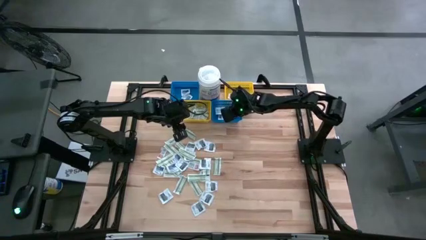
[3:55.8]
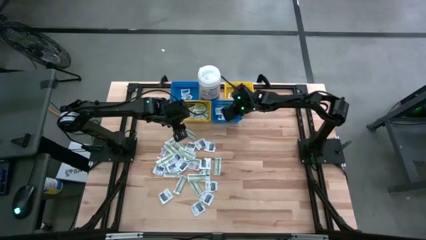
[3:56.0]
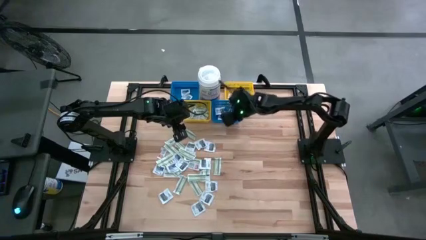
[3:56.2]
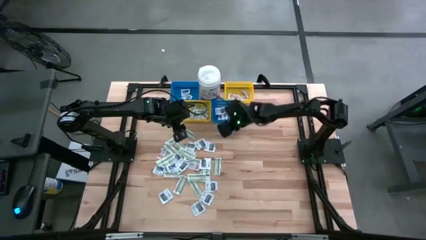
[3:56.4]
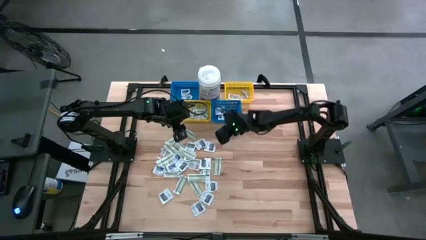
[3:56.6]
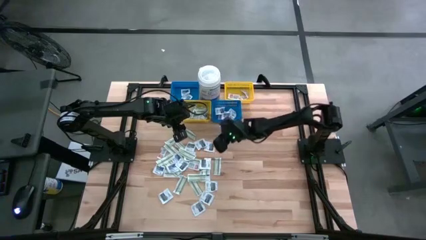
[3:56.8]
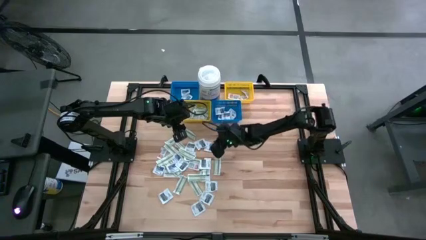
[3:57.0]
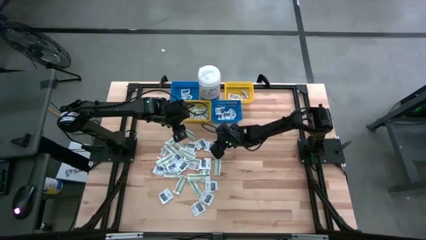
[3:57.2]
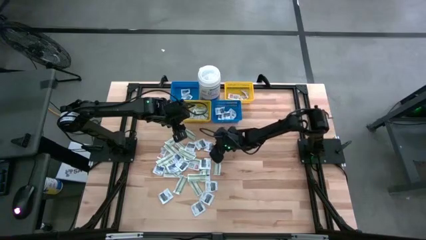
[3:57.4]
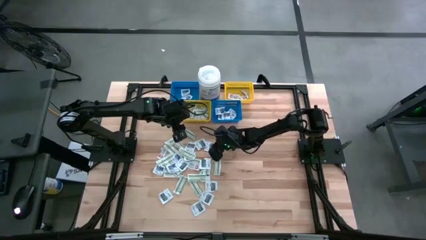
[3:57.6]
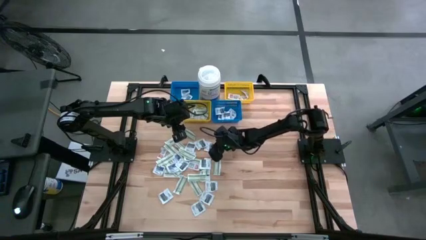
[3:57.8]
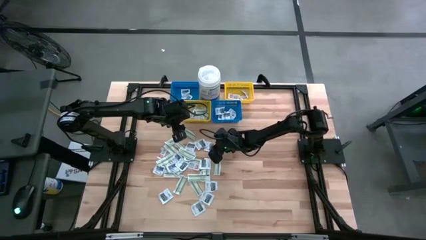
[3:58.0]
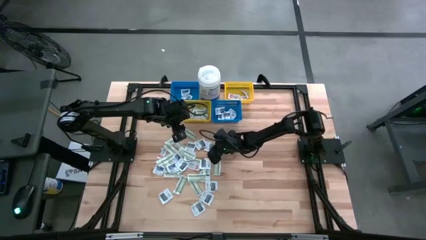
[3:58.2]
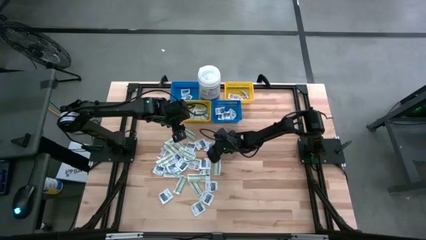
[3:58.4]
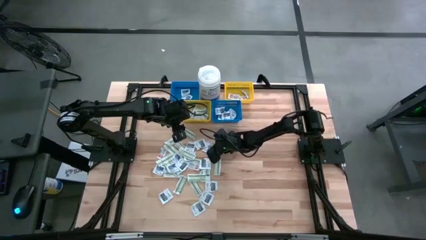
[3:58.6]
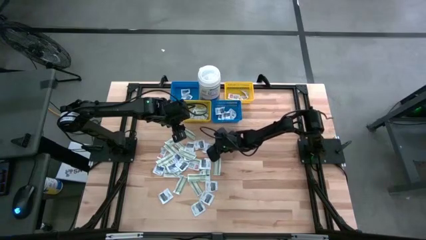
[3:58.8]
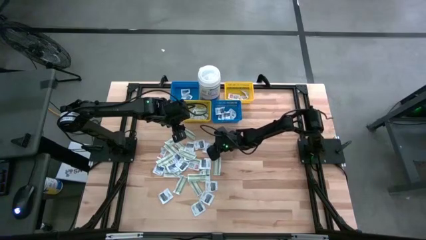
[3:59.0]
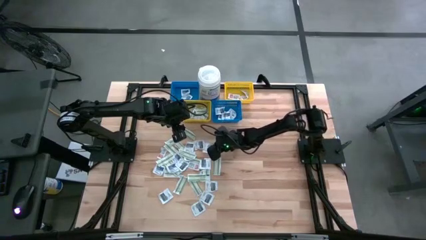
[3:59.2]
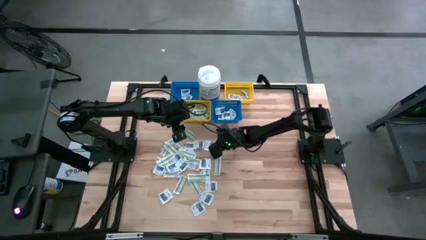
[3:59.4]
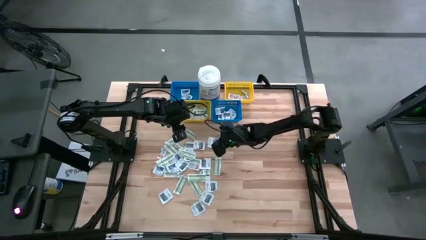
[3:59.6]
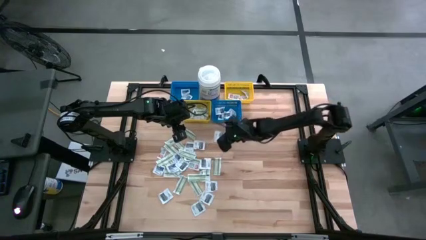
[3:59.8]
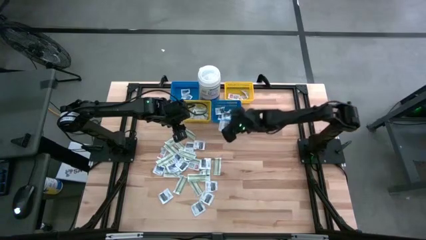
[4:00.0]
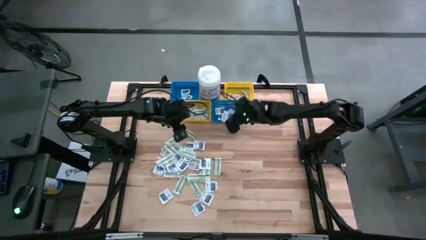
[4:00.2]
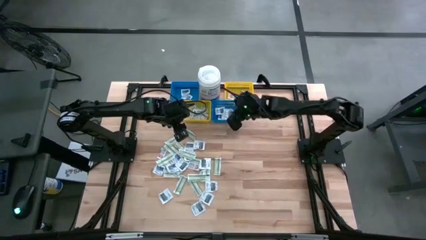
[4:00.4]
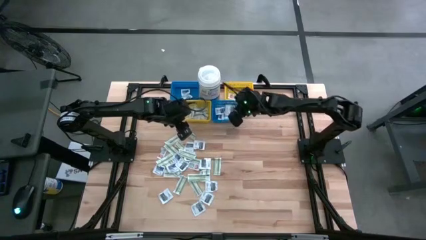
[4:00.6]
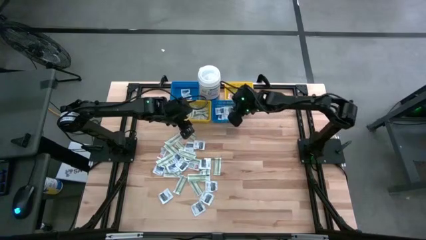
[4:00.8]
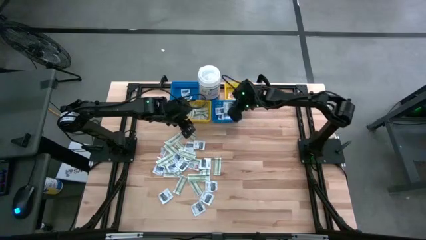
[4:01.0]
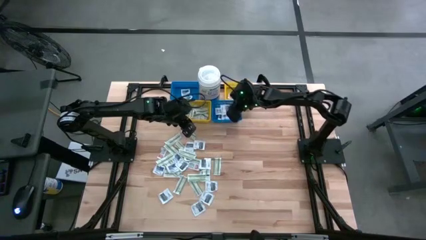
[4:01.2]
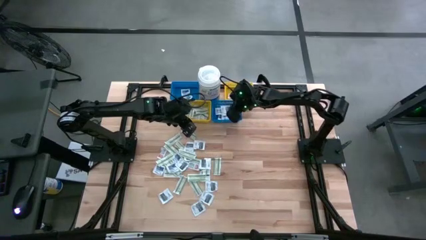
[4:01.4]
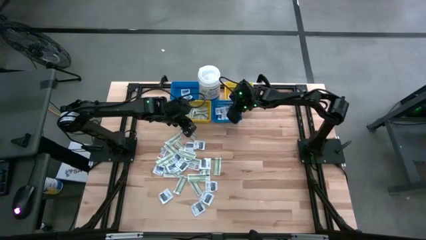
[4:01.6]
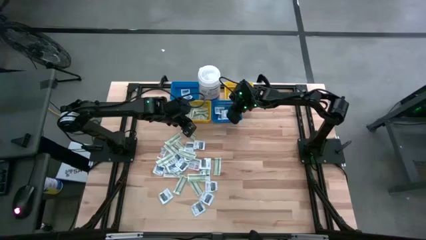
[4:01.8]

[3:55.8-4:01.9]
Task: Pick & Place First Aid Supplies
Put the black towelette pack into the right blue bin

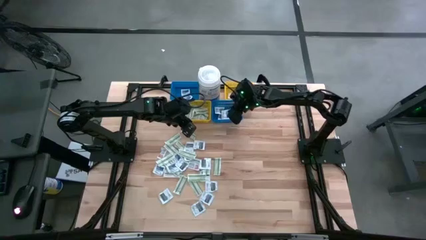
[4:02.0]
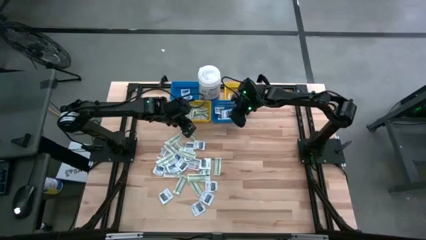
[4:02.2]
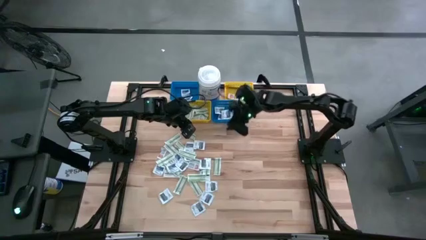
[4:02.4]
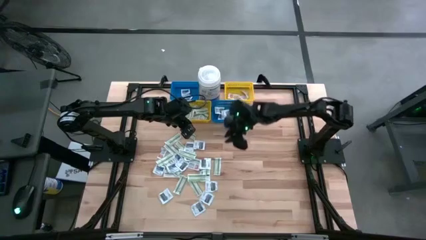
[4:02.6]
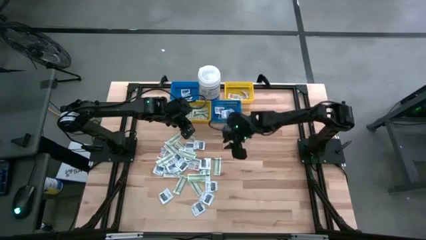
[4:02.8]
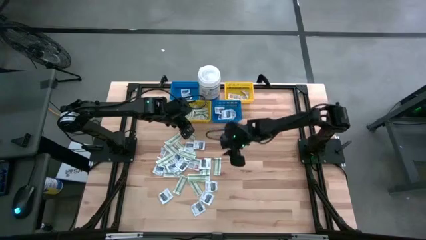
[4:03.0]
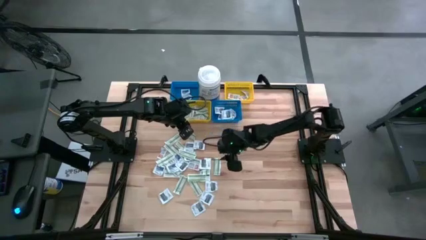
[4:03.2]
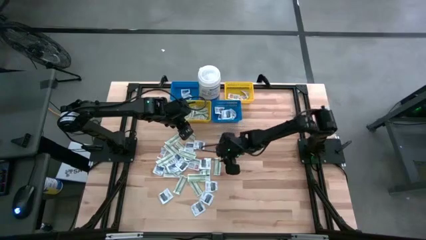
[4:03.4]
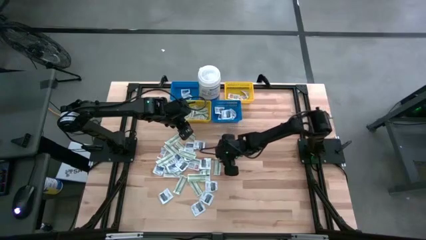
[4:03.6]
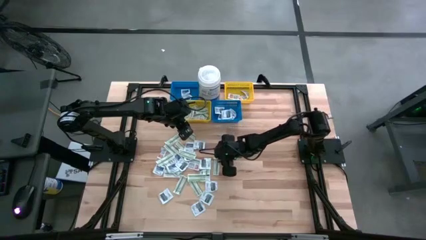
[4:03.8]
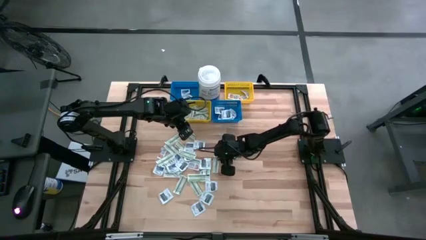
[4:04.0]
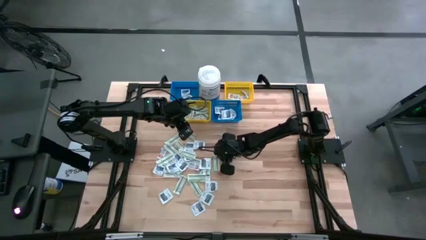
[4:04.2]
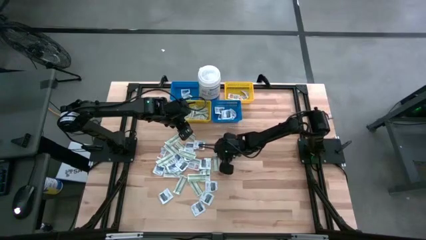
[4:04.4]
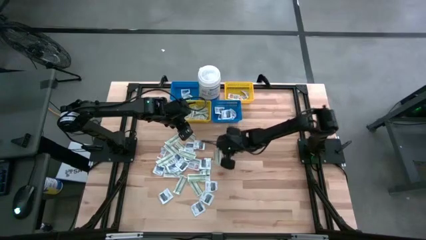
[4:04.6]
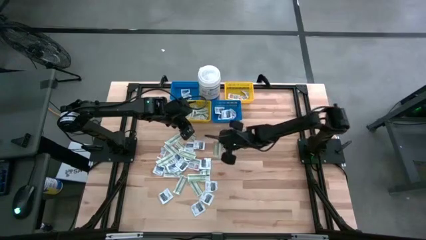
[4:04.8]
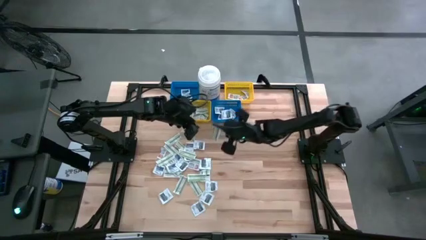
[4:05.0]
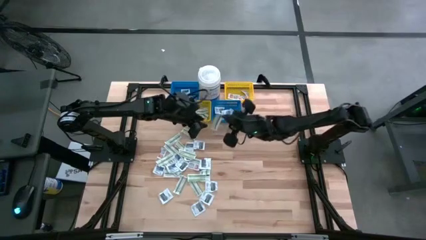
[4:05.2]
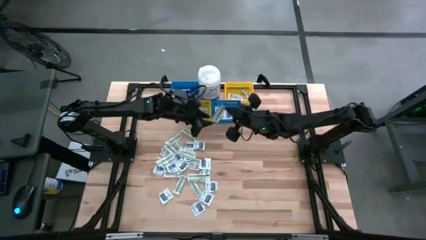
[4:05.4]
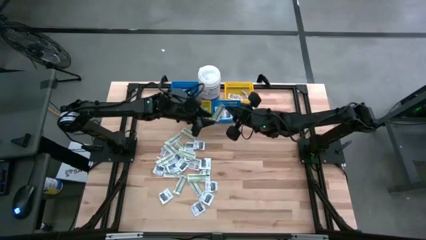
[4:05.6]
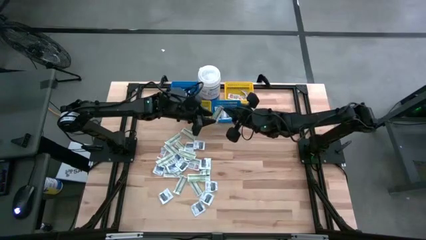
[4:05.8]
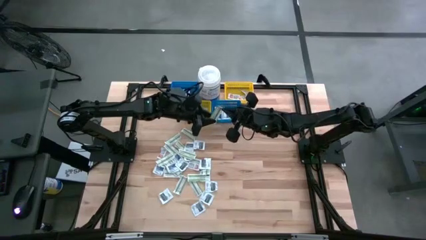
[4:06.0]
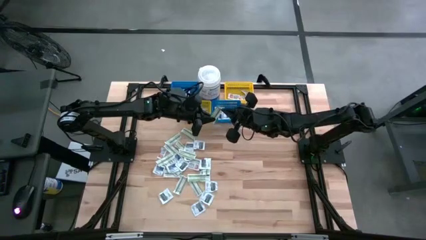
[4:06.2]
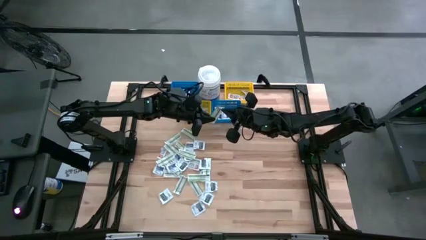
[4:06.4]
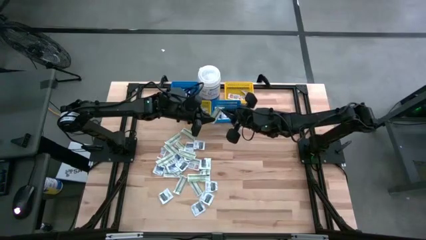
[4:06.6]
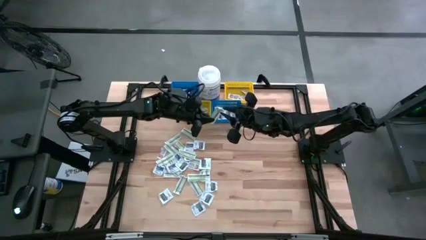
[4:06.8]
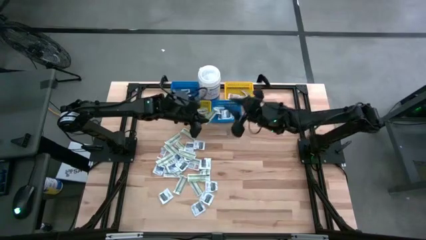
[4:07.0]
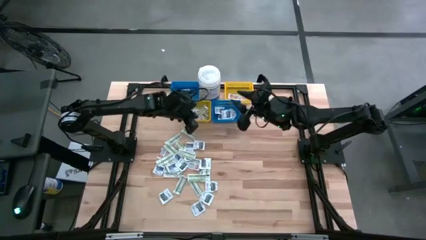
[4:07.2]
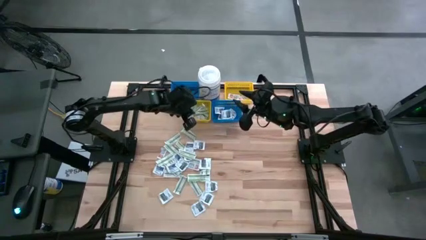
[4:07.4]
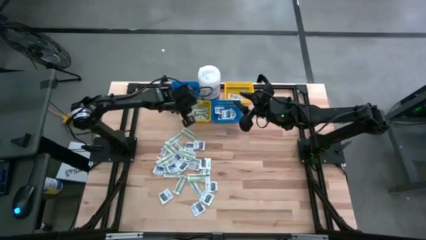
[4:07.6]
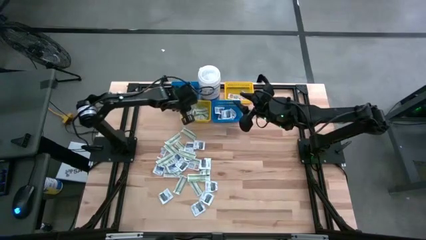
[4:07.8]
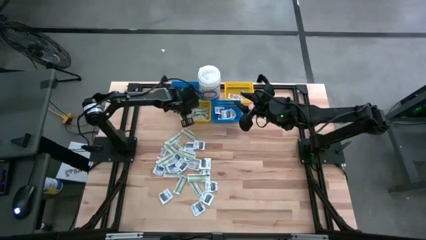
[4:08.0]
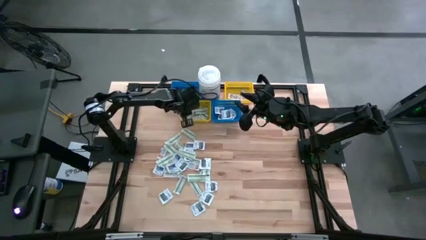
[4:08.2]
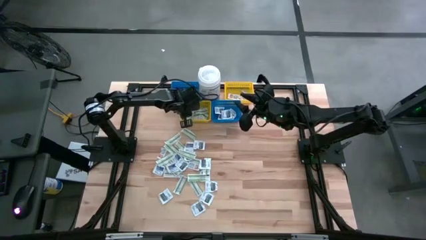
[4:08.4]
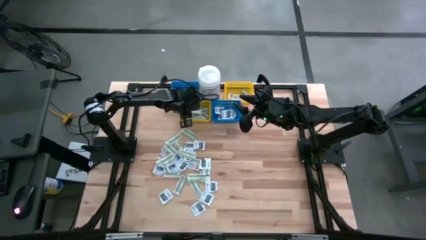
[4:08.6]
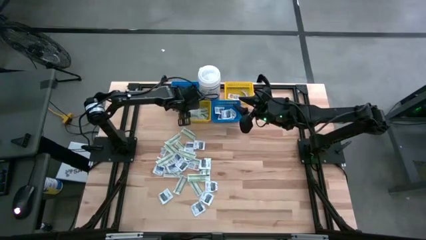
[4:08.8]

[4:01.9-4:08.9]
Put the green bandage pad into the left yellow bin

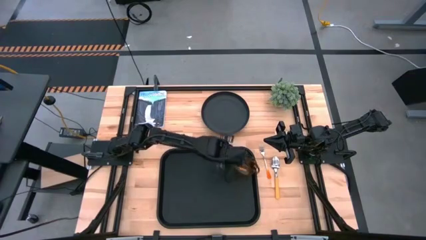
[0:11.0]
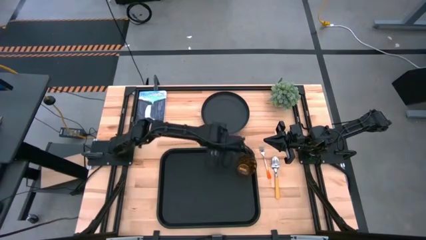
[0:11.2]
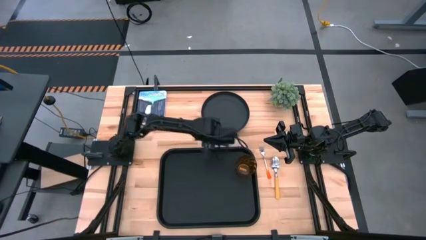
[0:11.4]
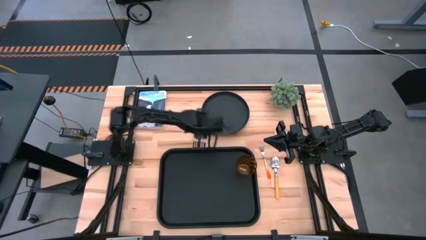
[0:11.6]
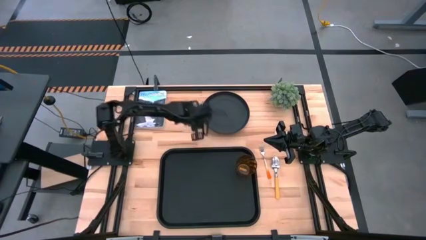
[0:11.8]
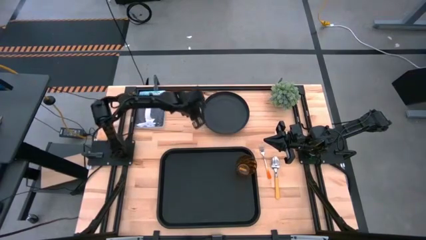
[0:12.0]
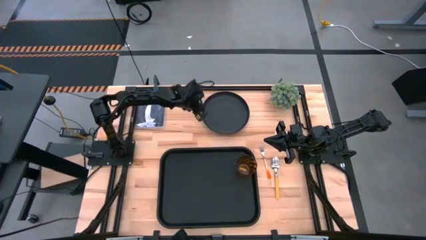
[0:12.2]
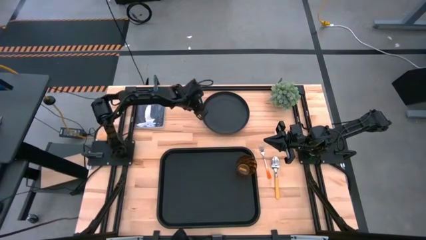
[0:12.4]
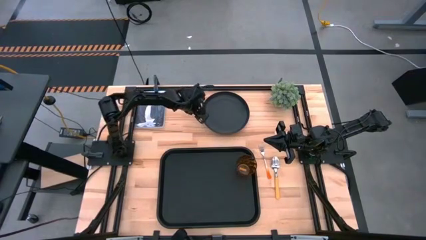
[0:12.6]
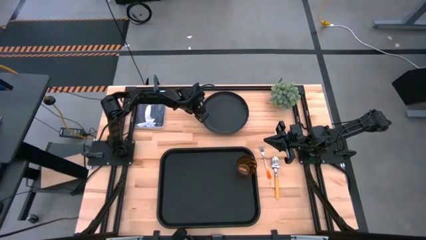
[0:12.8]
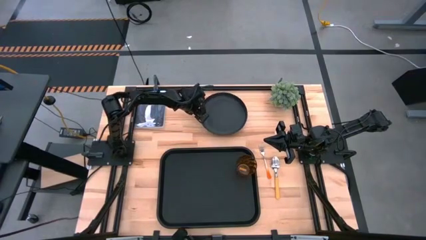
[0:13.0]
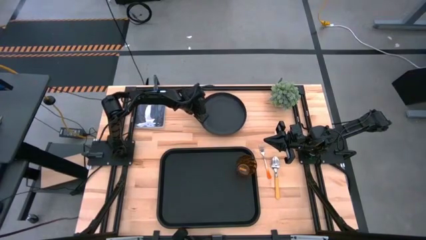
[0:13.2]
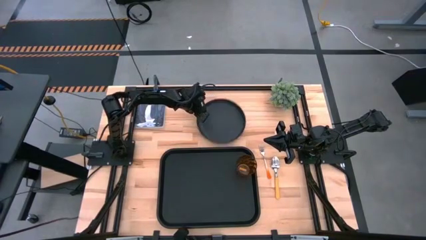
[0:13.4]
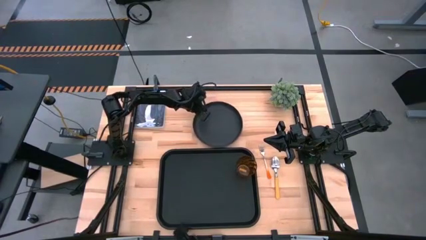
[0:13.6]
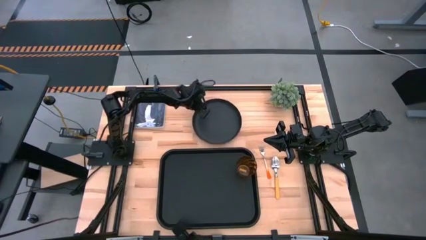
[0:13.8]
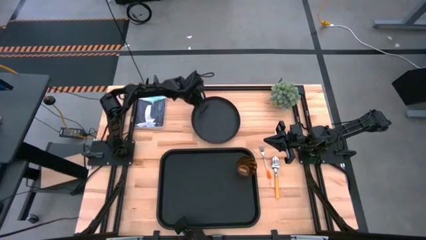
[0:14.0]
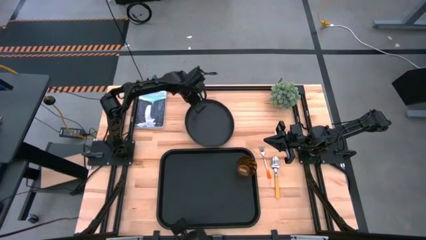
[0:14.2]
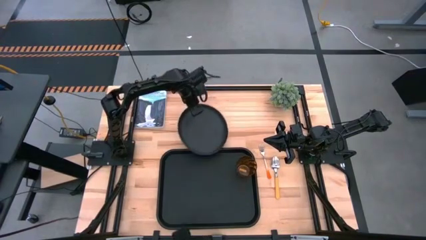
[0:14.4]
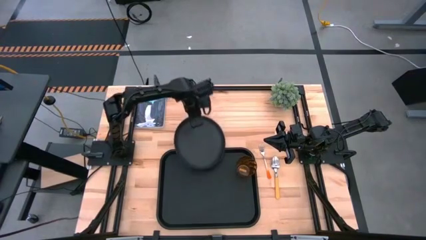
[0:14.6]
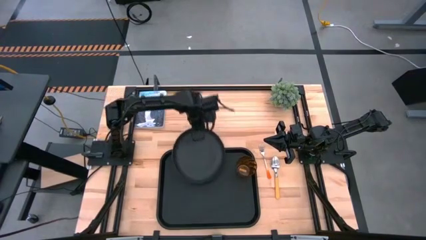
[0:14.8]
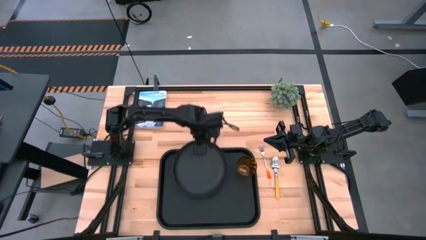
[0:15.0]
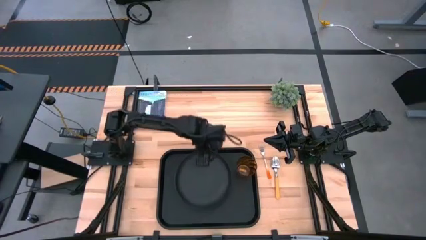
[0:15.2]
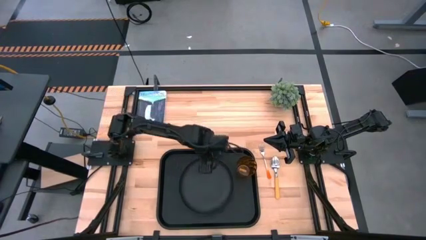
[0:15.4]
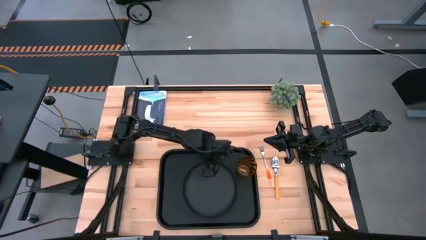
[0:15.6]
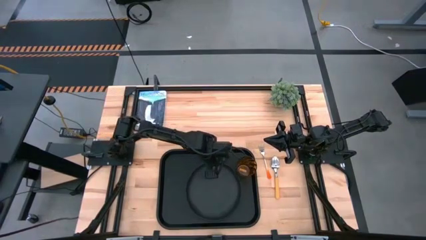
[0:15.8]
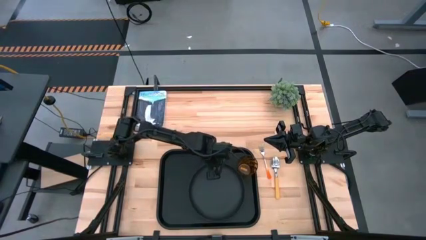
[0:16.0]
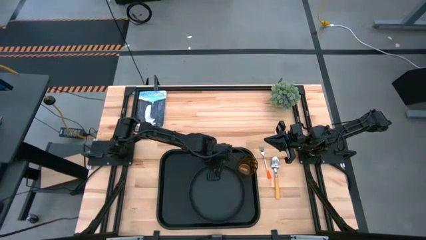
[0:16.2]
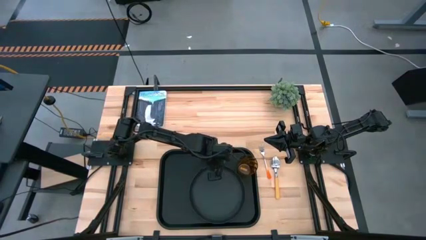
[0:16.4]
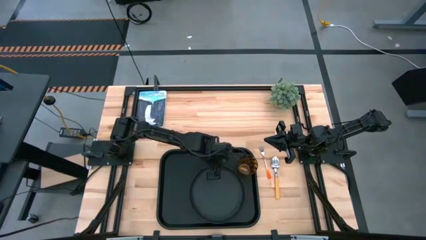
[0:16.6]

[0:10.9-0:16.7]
Task: Pick and place plate/cup/fork/spoon on tray
Put the black plate on the black serving tray to the bottom right of the brown glass
